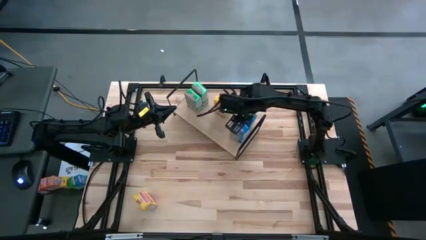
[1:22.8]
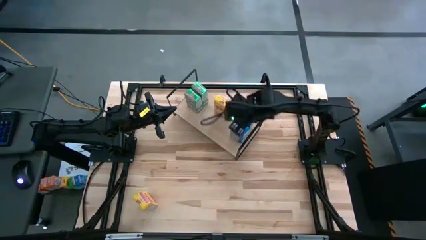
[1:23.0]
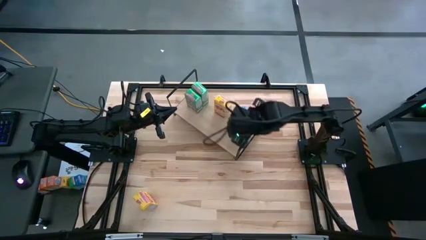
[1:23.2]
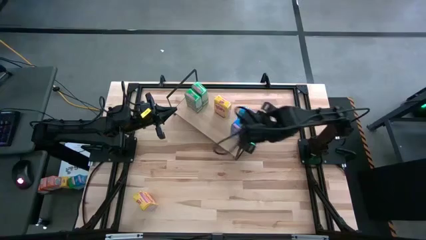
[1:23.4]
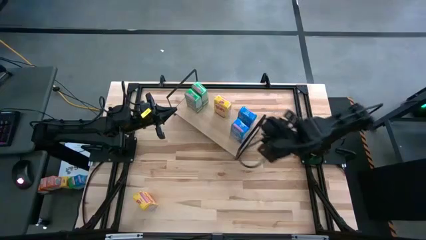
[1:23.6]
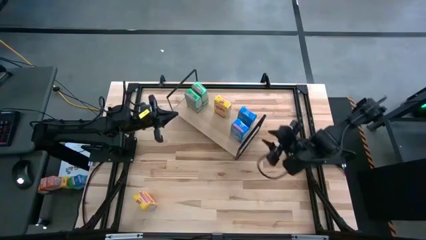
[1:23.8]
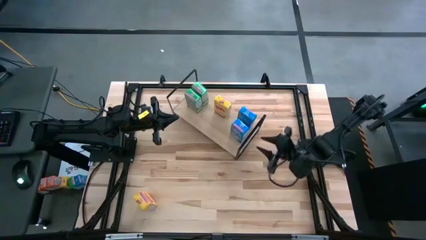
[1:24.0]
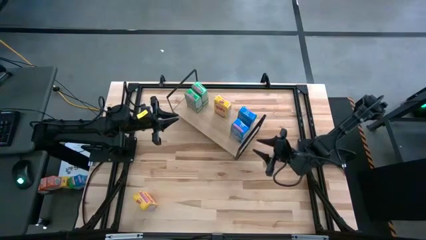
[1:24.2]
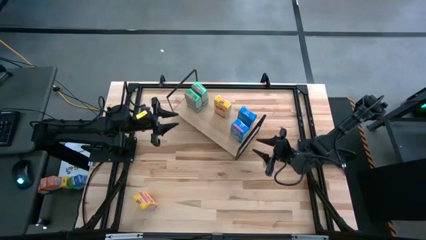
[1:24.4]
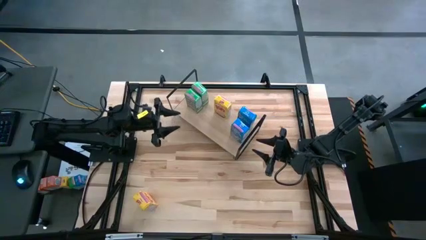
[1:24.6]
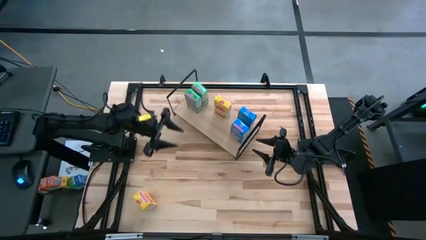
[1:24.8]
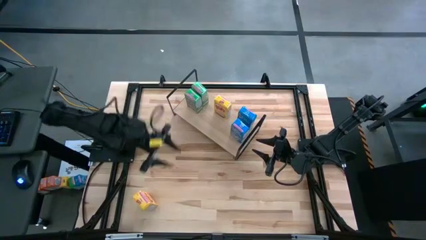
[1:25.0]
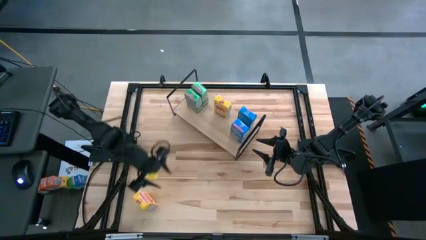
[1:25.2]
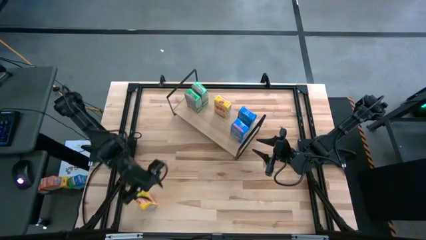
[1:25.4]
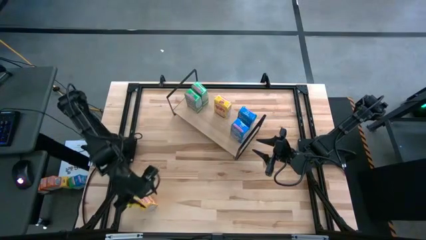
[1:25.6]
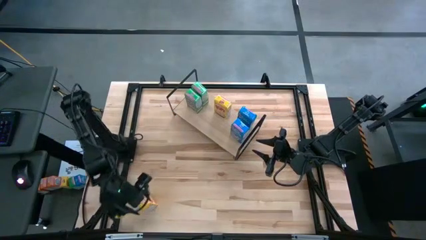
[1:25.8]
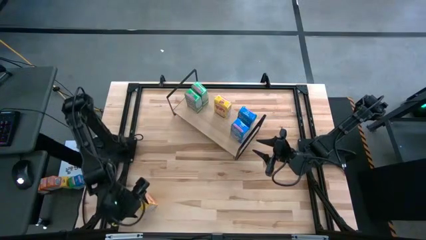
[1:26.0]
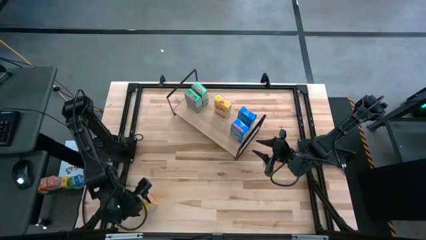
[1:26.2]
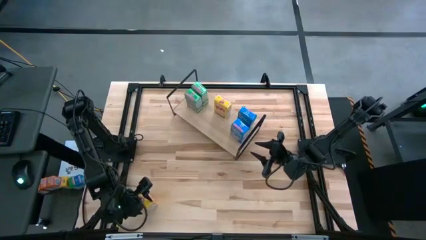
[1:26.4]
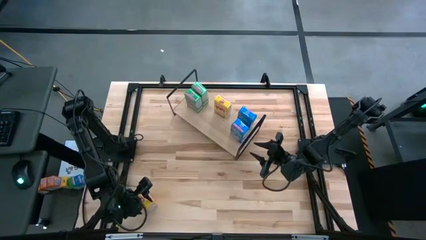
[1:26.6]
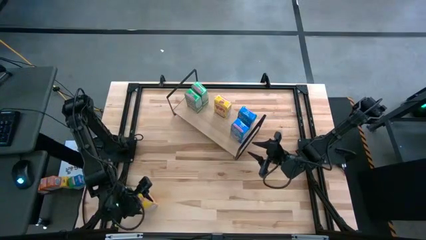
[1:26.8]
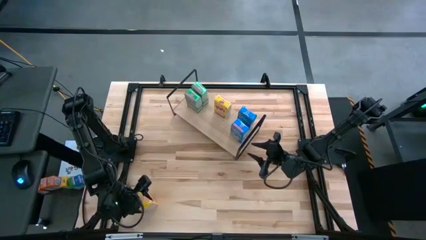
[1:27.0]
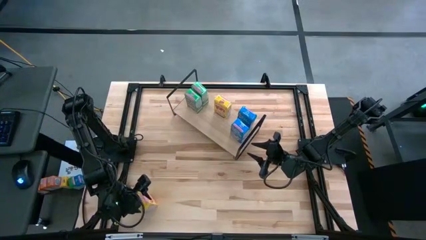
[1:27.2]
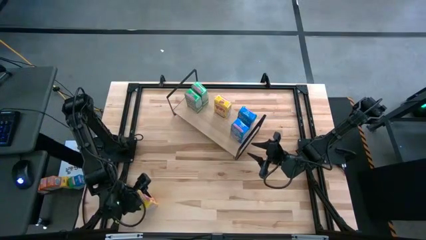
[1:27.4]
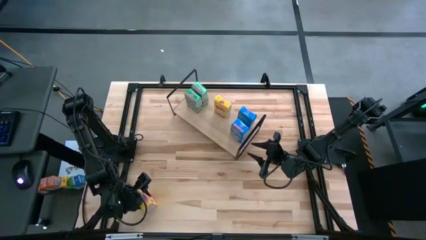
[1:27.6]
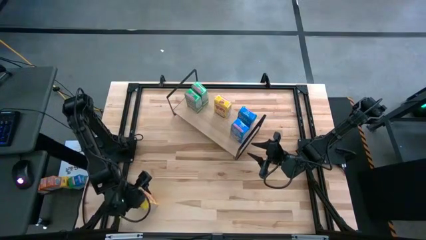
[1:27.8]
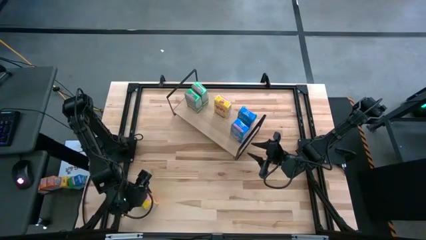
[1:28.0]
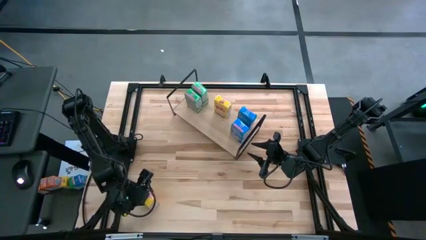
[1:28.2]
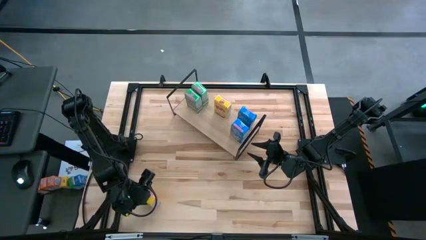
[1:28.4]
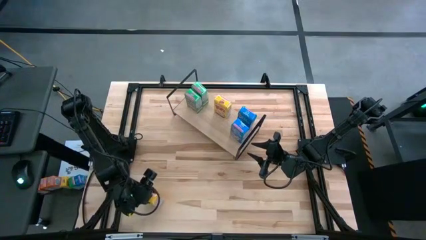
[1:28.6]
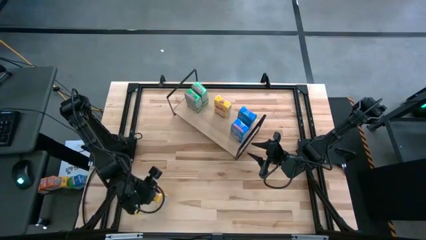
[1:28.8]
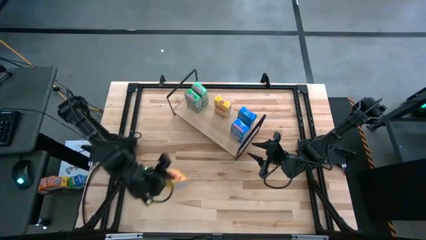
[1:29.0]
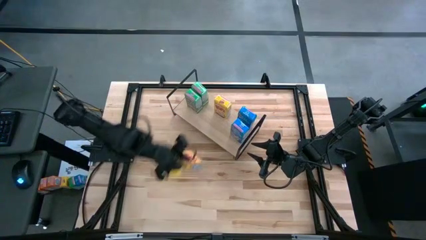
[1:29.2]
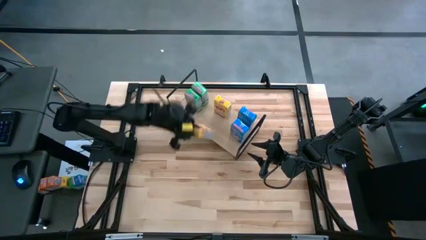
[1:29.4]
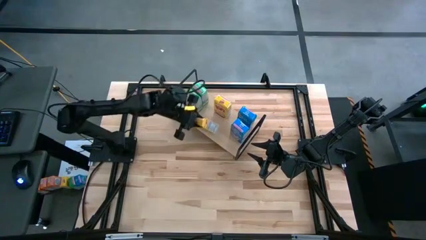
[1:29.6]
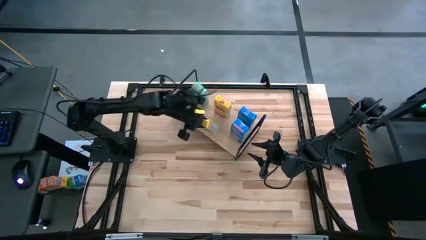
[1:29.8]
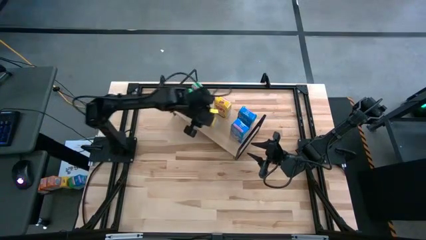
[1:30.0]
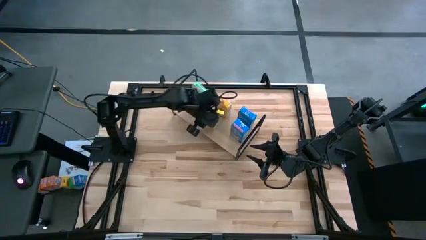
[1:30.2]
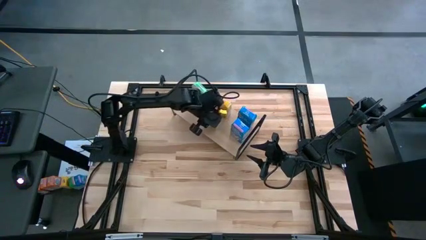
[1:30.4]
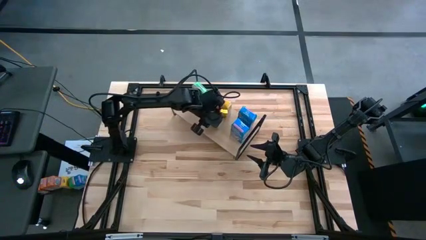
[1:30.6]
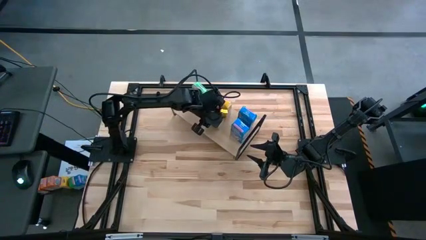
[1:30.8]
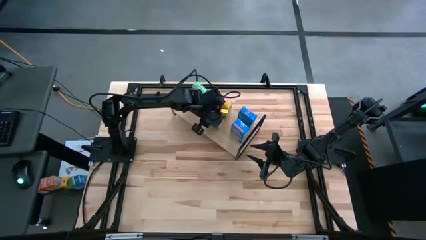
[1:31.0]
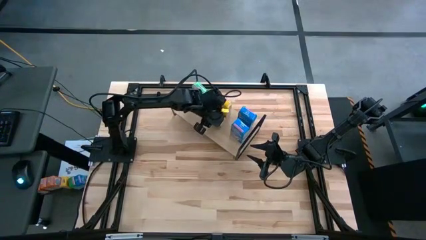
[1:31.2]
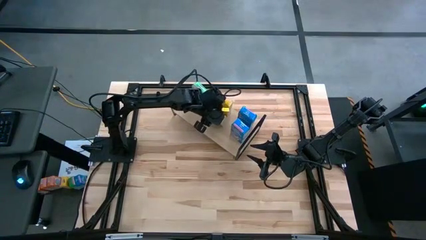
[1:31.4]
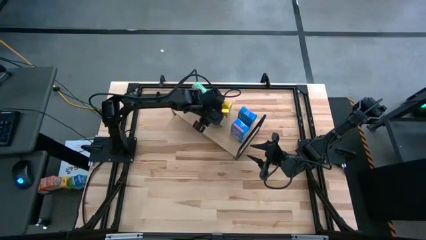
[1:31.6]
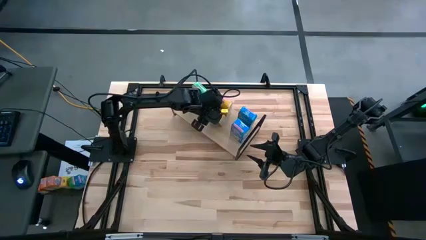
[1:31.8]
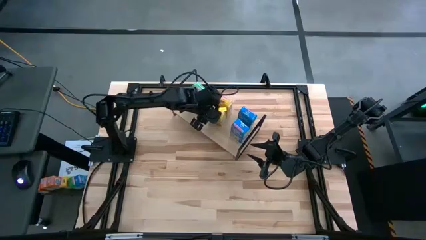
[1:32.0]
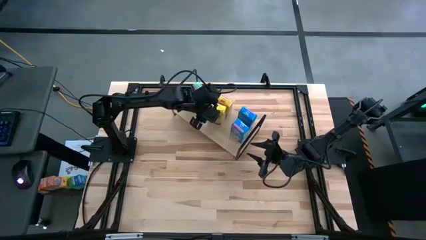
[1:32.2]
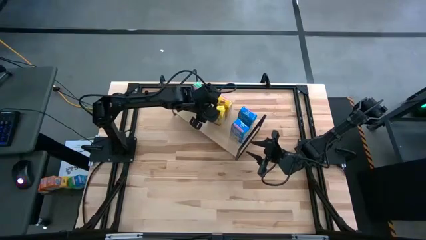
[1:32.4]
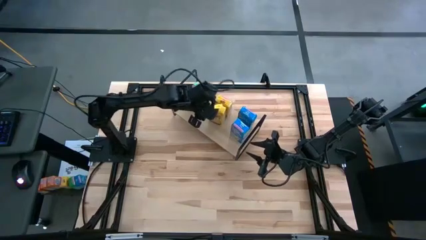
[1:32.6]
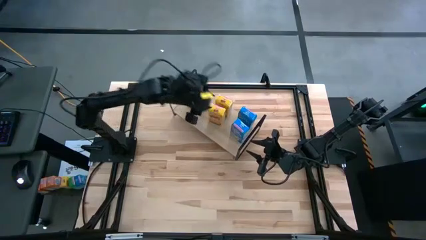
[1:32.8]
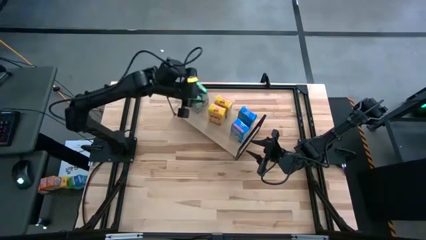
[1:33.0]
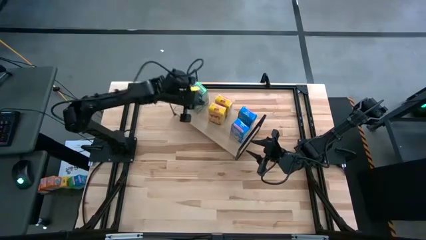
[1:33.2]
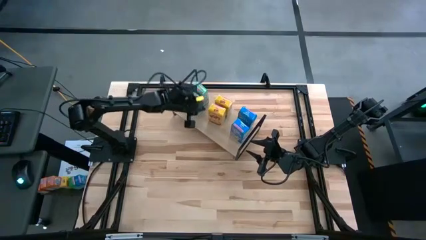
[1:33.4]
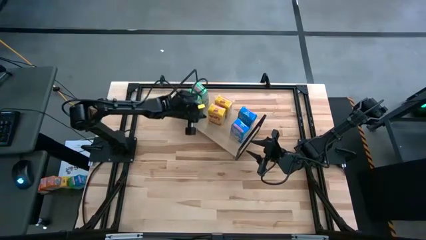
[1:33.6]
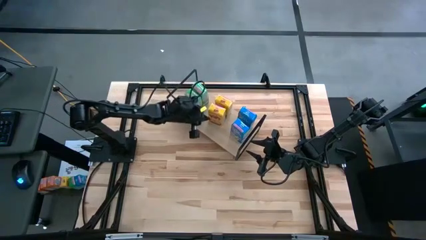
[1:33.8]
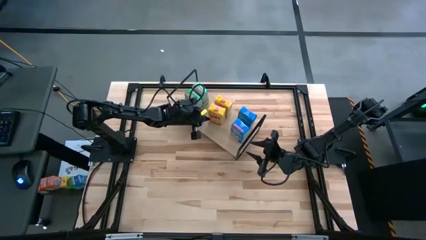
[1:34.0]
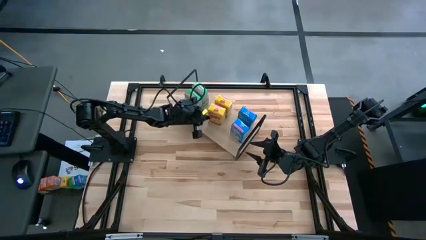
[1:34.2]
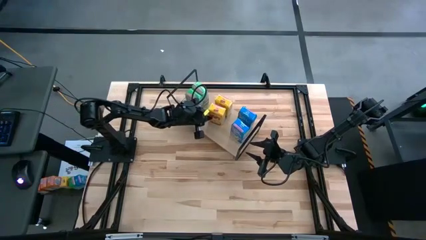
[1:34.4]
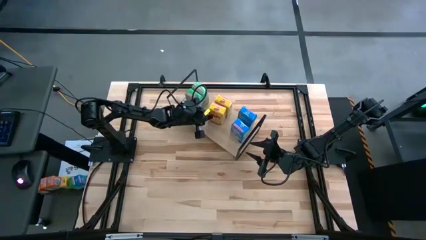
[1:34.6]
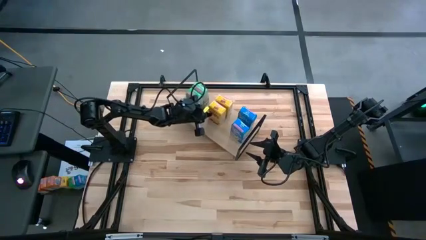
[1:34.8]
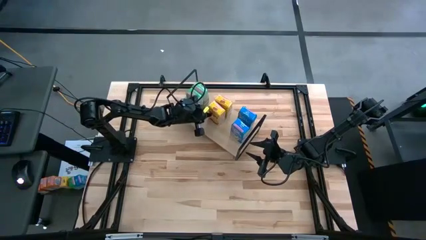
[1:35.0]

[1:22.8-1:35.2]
Task: Stack cereal on shelf
Put the yellow cereal box on the shelf aligned with the other yellow cereal box

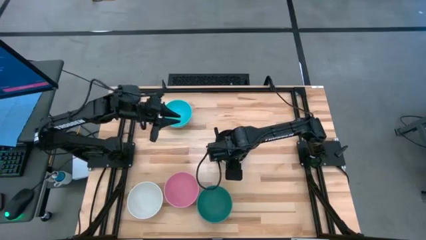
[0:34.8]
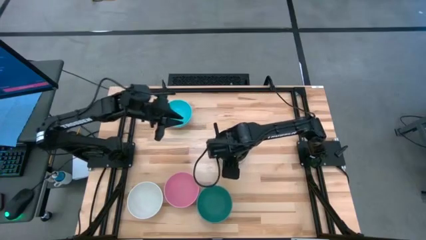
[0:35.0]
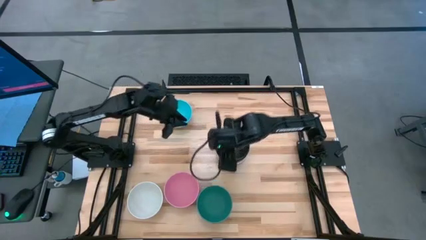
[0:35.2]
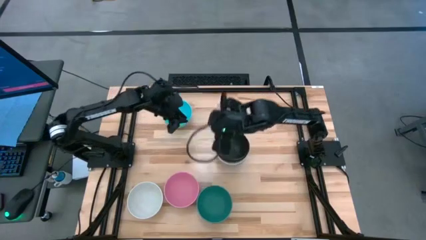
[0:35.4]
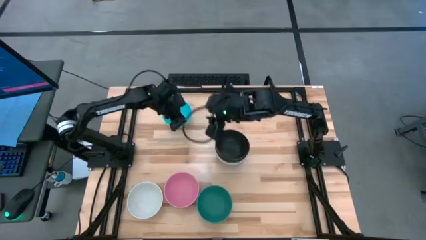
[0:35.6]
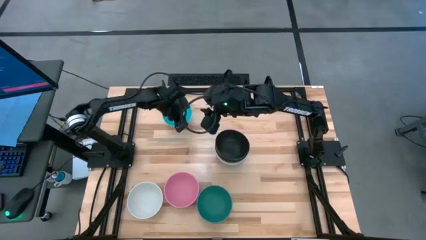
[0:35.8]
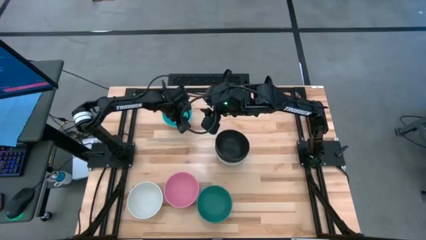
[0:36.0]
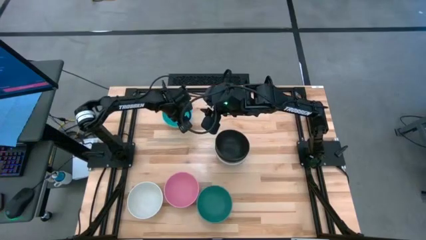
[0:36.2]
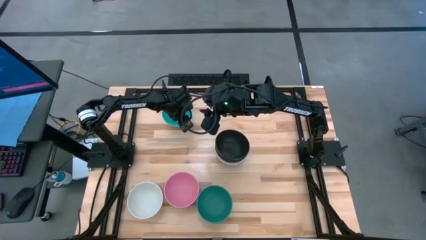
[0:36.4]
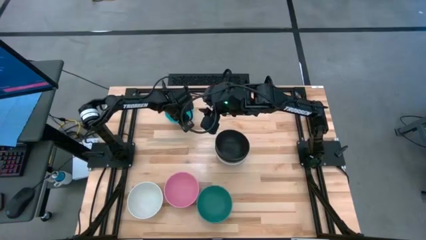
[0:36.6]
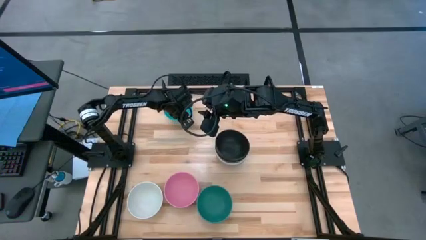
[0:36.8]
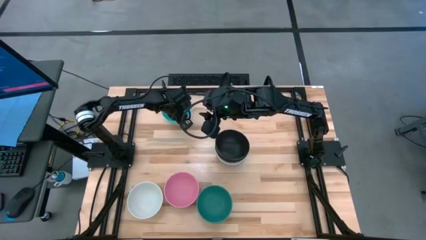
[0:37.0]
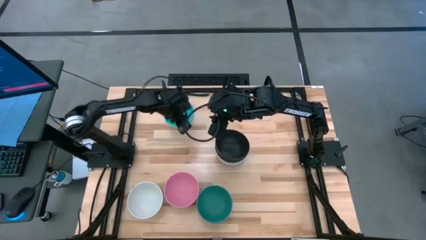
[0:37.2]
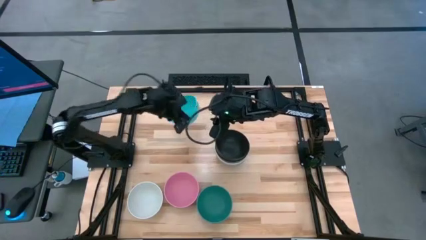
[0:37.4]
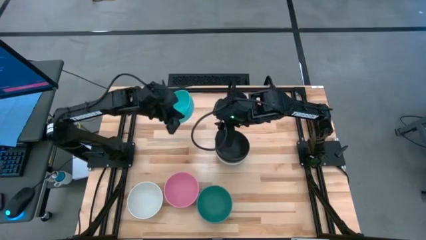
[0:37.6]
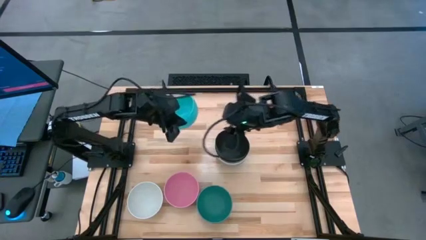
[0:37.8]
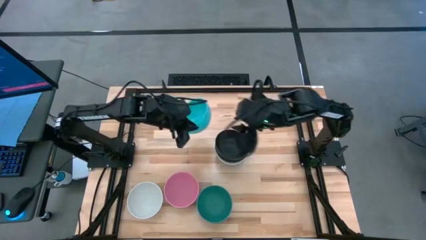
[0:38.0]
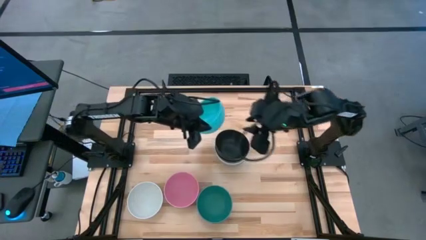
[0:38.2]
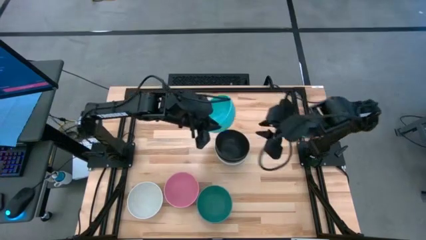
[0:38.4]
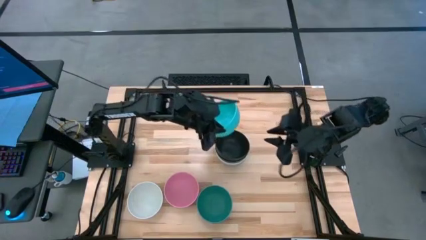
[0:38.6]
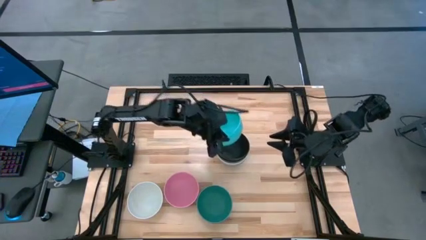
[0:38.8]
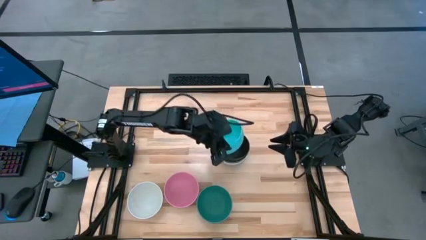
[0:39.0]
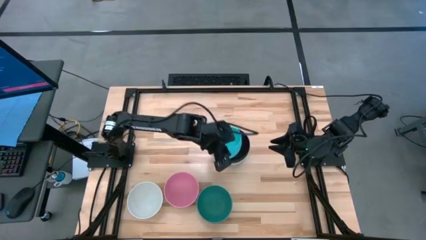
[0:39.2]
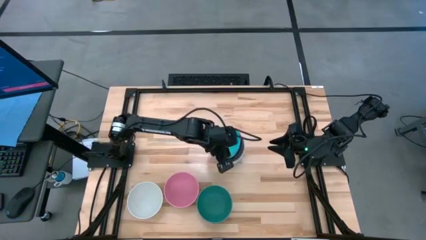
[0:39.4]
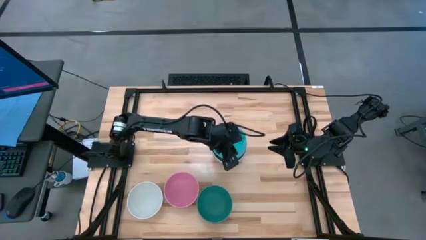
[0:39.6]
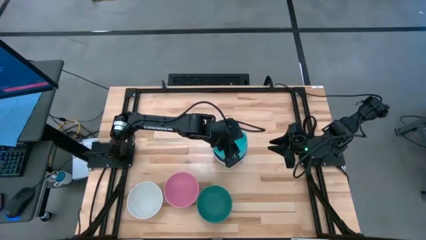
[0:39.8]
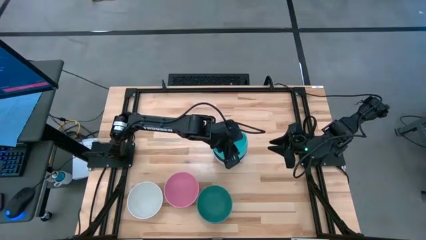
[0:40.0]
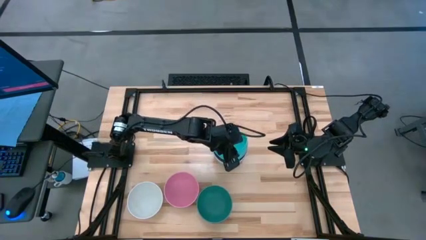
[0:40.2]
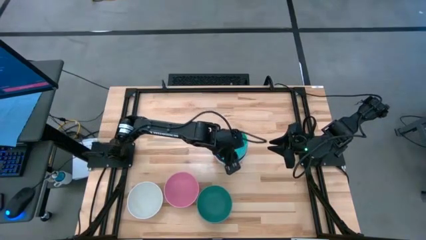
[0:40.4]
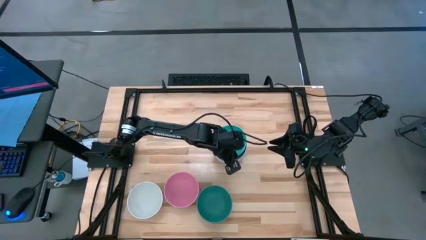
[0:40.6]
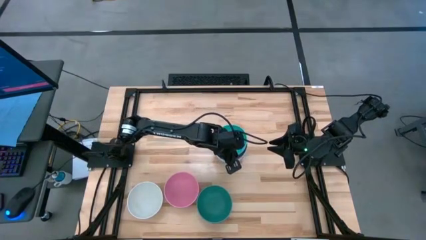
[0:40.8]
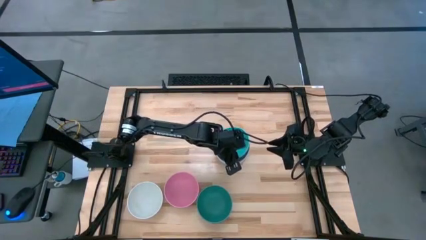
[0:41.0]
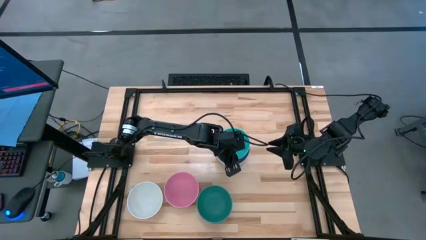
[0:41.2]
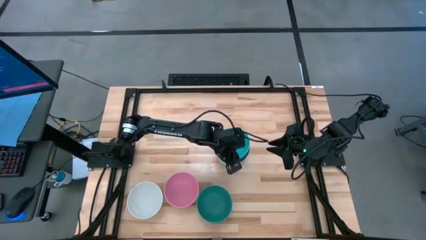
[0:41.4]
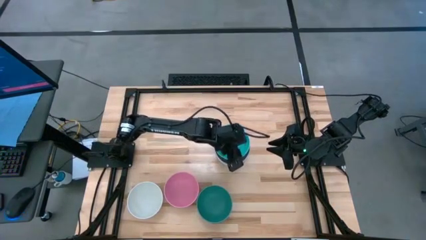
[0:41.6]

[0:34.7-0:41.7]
Task: Nest bowls inside each other
Stack the light blue bowl on top of the black bowl
